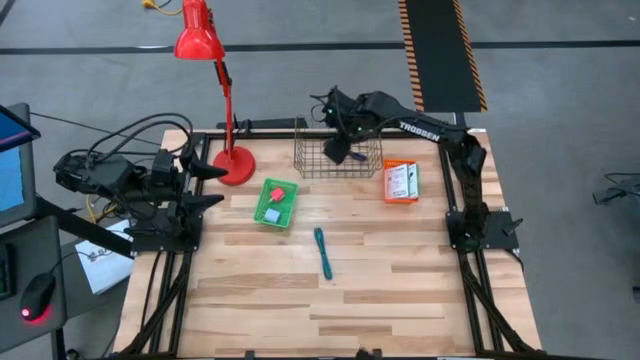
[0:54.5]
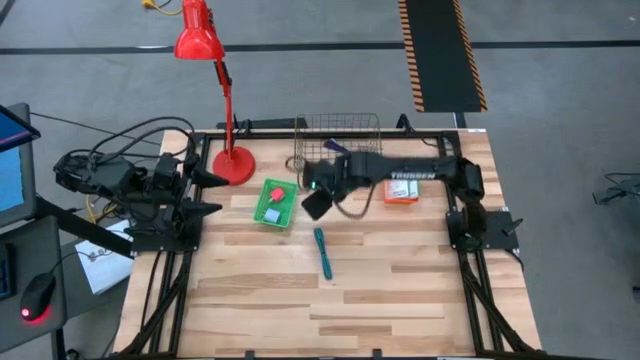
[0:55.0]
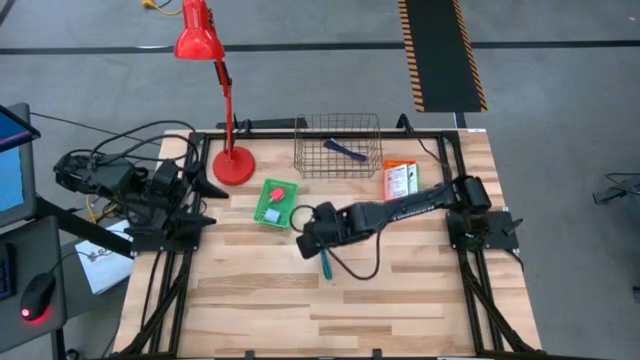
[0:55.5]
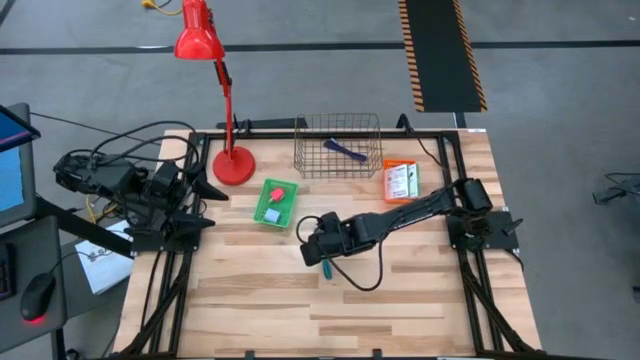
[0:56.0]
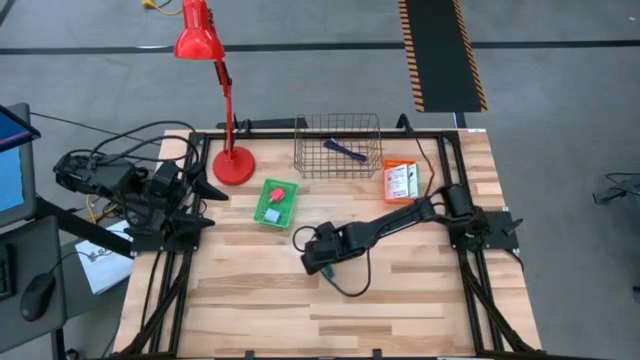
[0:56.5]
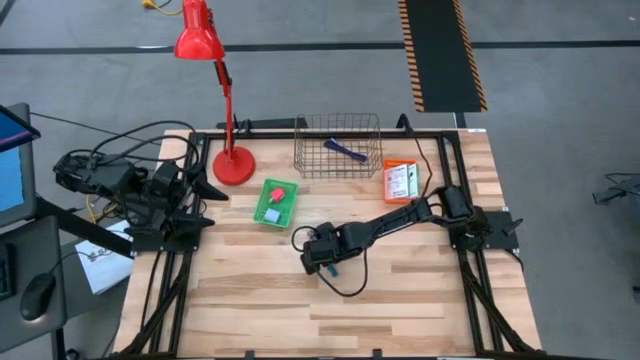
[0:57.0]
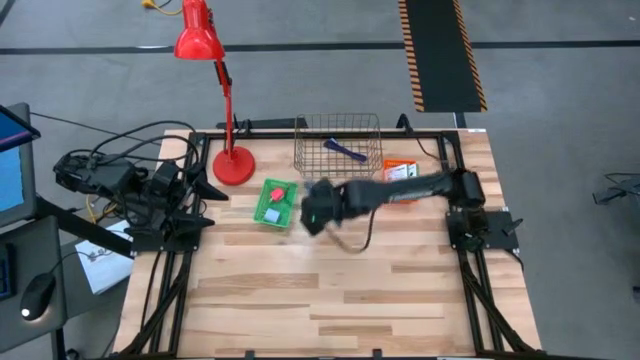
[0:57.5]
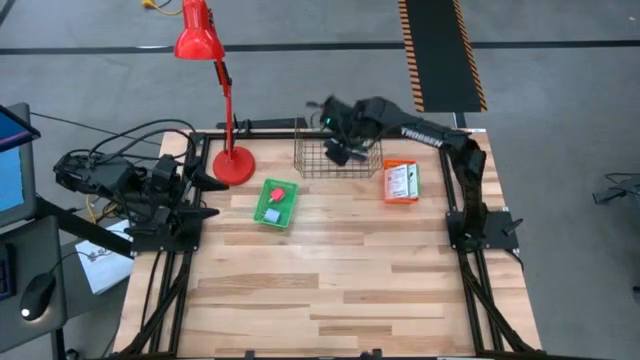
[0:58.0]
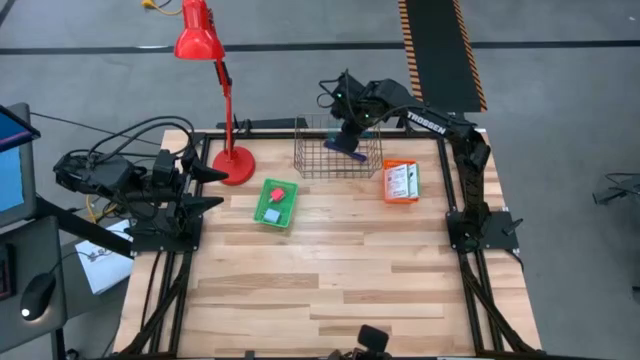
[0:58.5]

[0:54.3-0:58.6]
Task: Pick and place items into bin
Put the blue charger cable into the wire basket

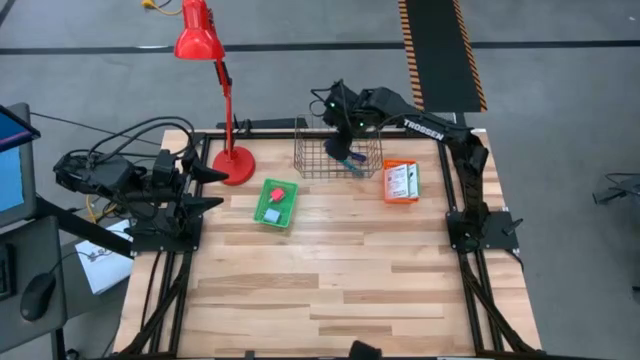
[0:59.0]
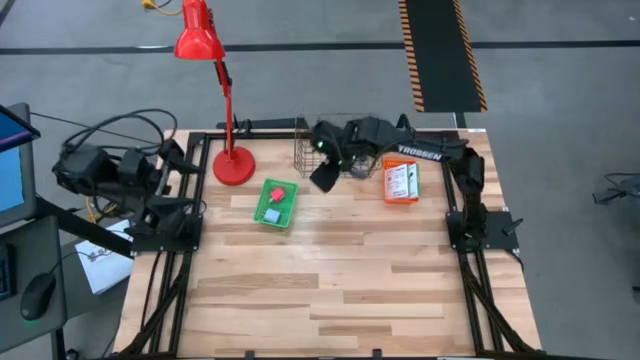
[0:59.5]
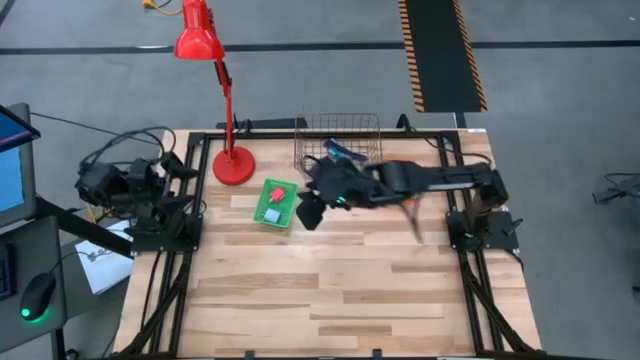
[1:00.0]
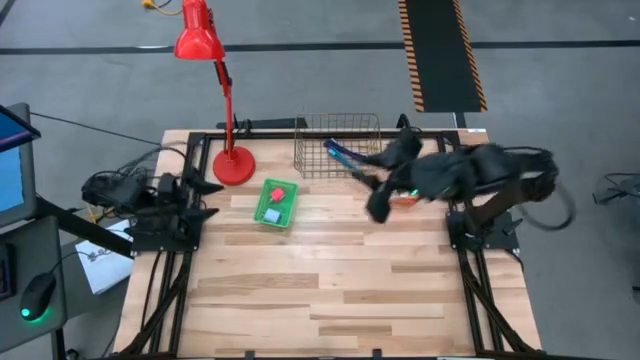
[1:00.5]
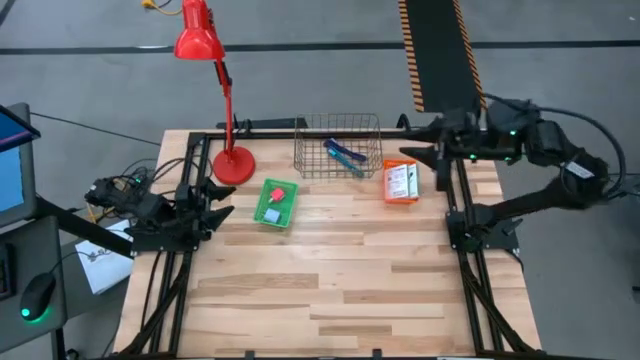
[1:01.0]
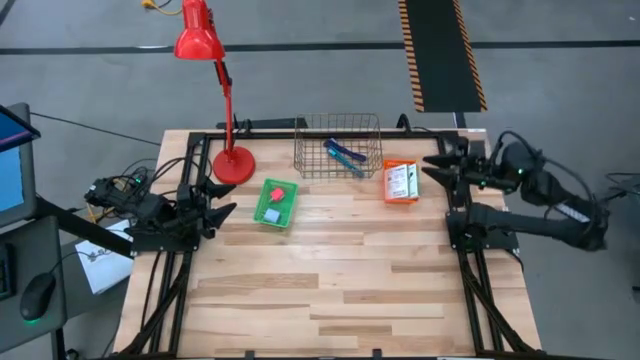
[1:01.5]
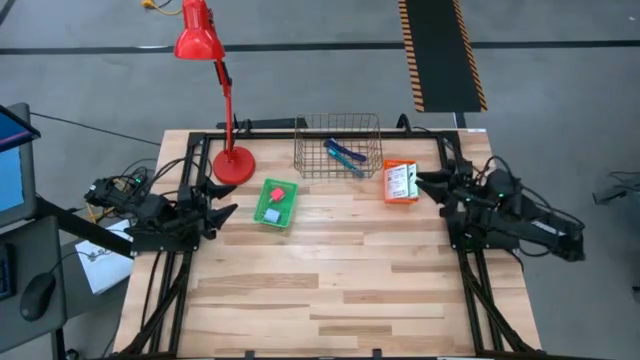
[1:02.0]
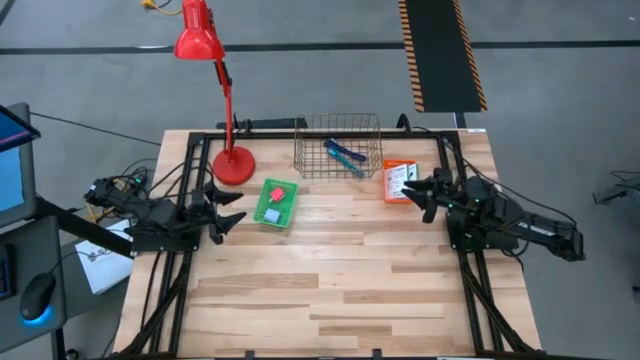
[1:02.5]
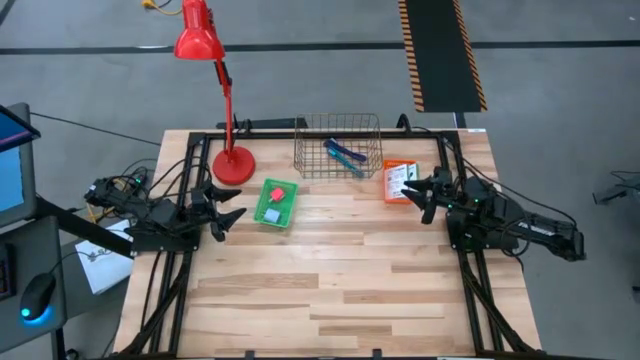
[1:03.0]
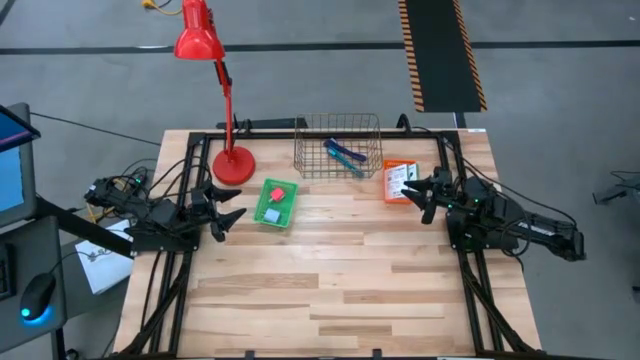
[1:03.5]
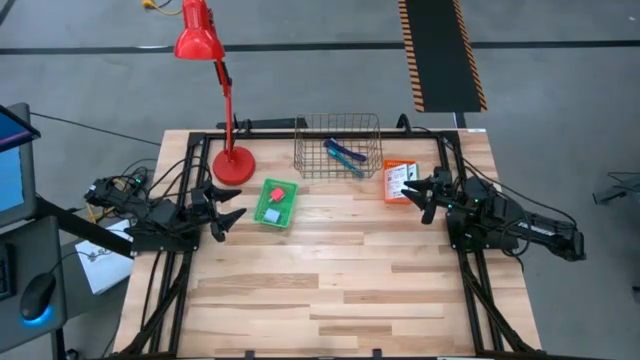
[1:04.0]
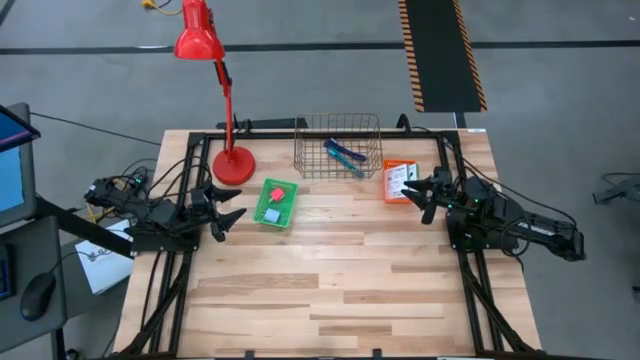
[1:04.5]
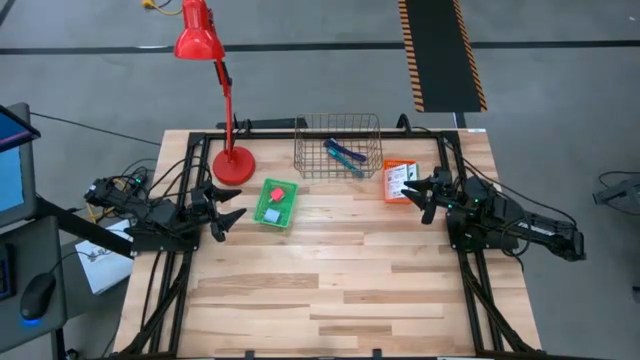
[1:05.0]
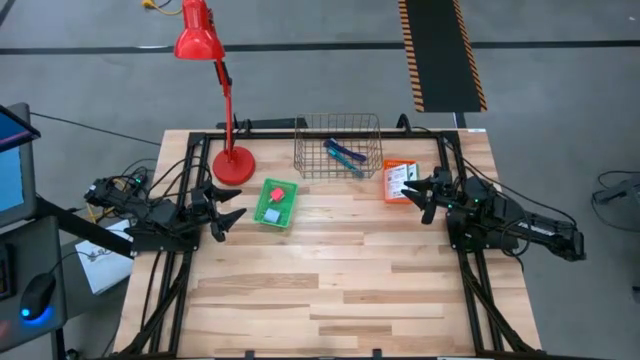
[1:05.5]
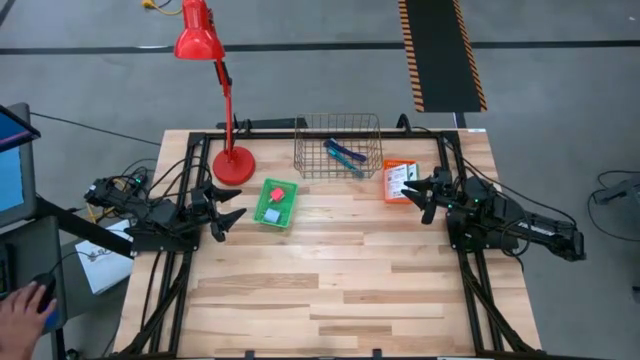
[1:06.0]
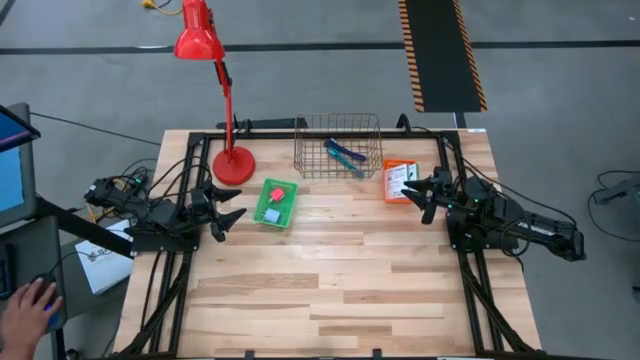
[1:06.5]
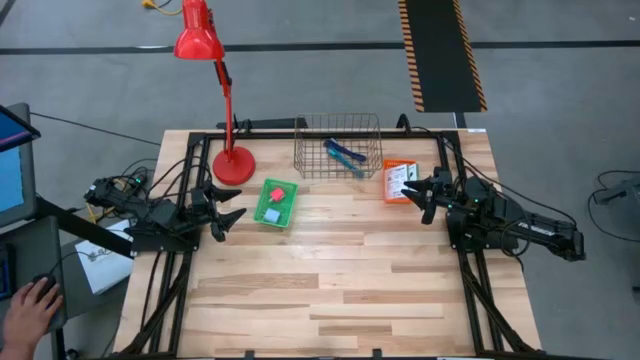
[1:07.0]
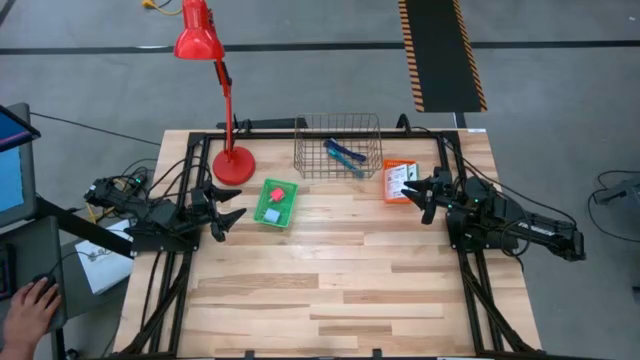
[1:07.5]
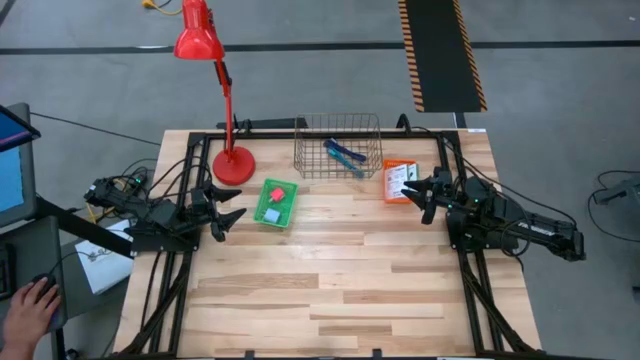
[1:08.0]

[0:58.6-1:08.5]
Return to Home Position
